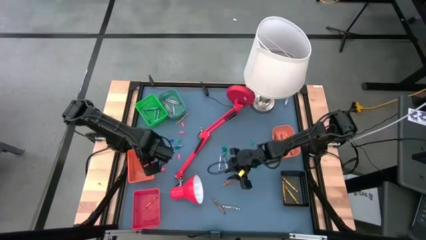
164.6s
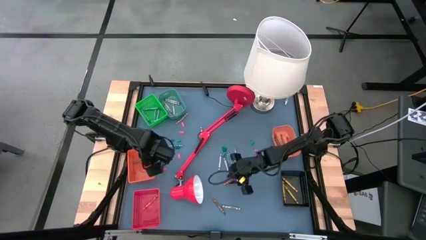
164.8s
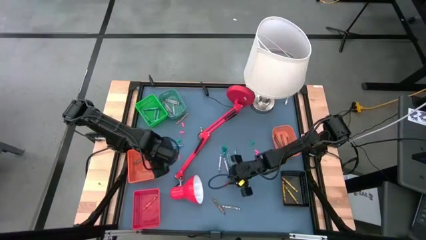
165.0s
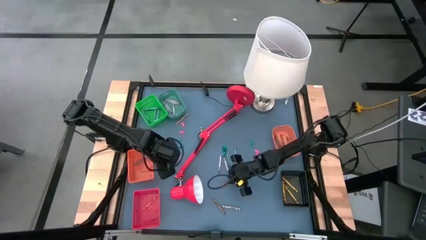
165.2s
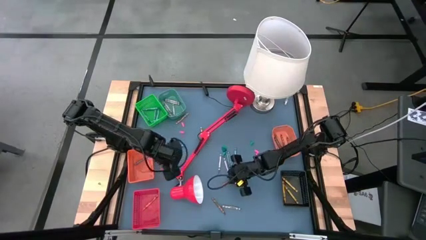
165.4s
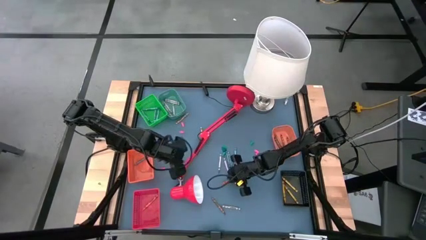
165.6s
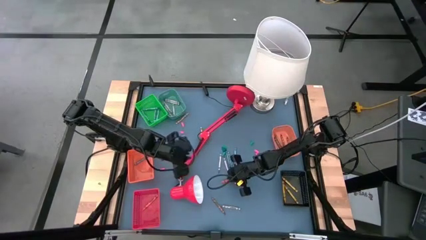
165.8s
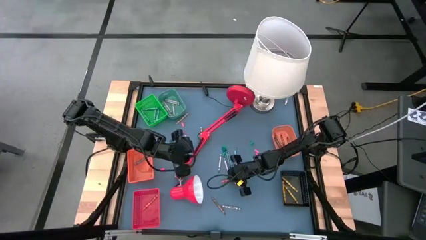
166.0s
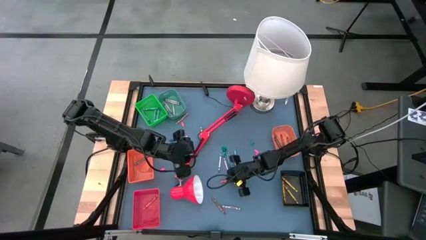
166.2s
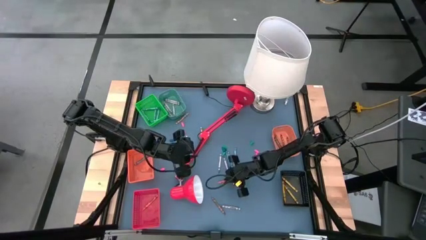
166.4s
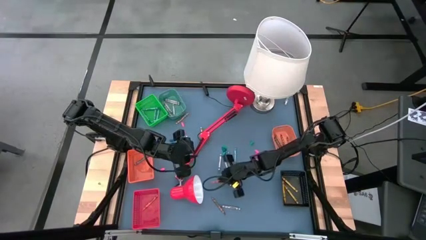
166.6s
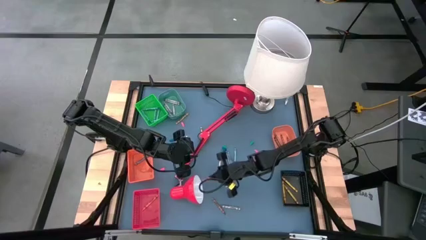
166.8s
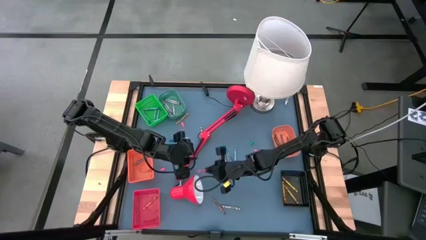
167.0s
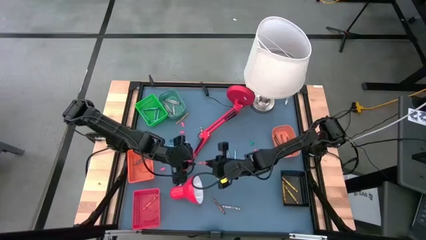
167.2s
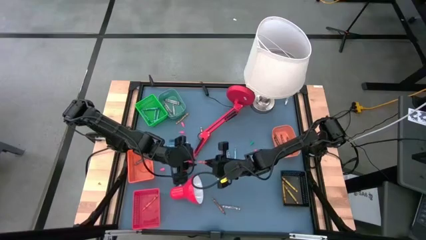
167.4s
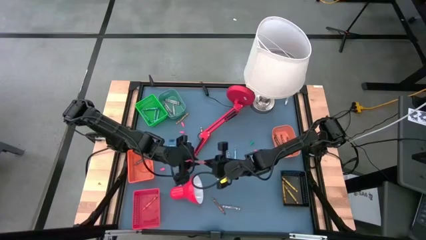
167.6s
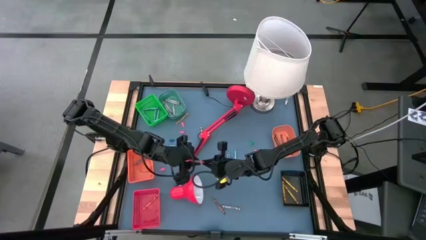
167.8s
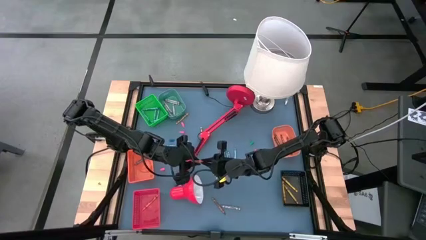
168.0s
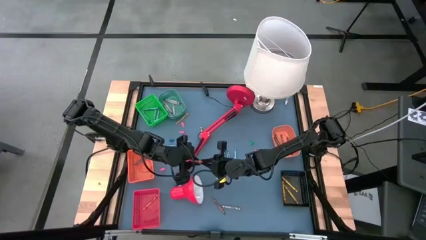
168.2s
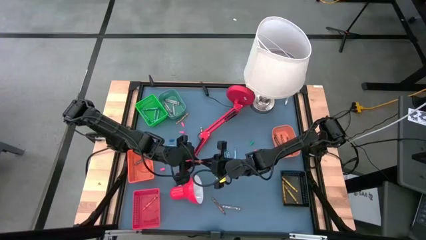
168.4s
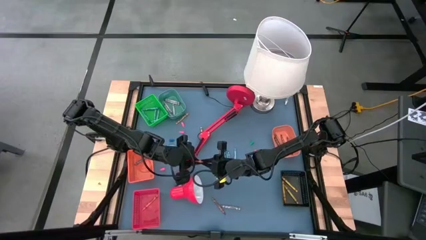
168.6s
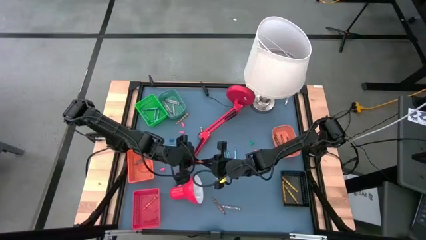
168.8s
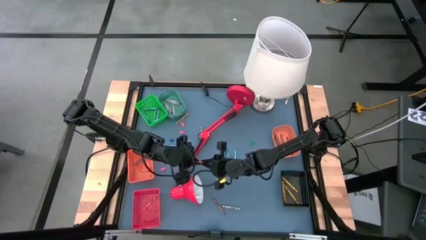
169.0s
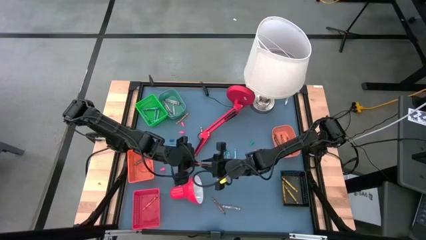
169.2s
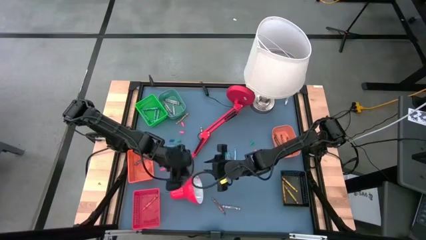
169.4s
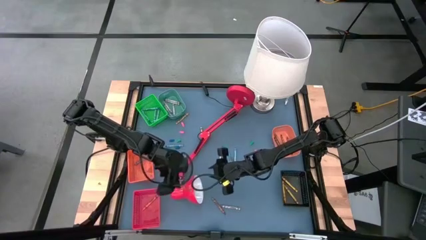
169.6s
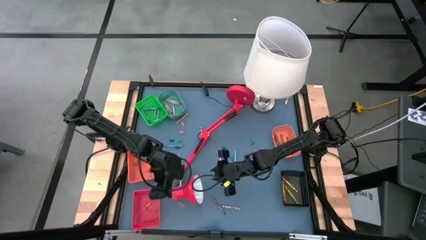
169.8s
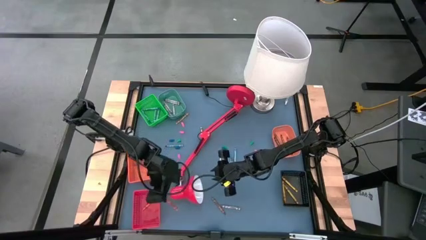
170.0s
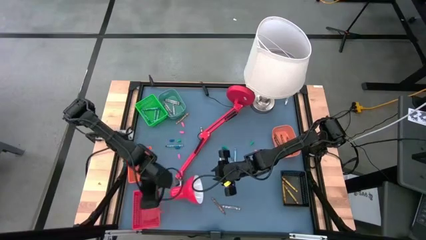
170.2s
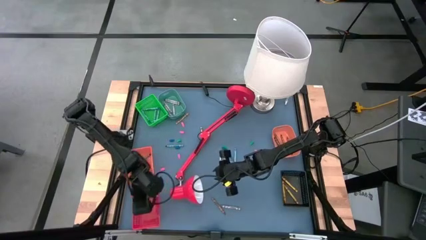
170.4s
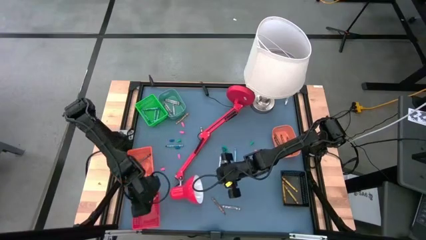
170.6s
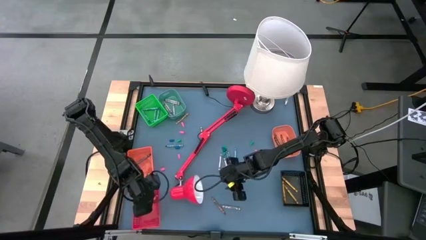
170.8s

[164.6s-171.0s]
Task: Sort crayons
Put the orange crayon into the red bin

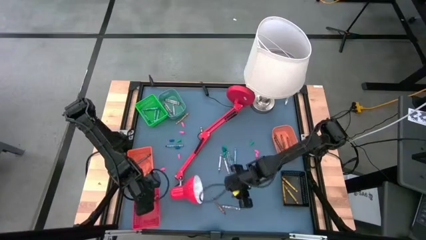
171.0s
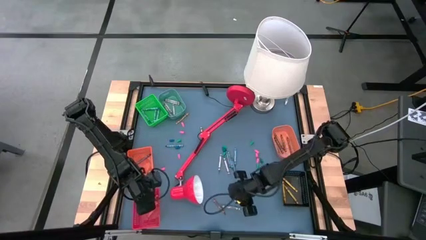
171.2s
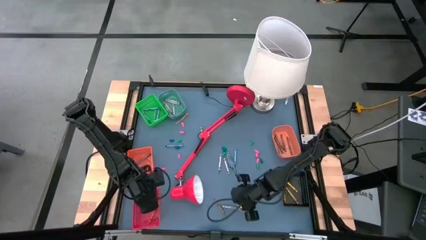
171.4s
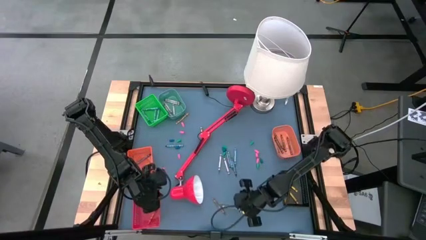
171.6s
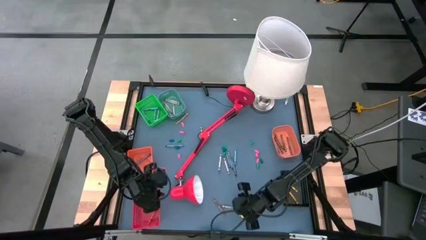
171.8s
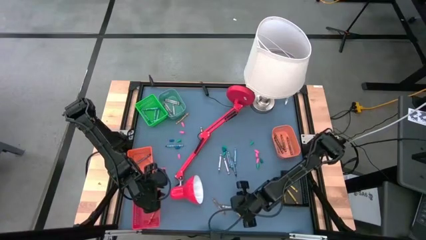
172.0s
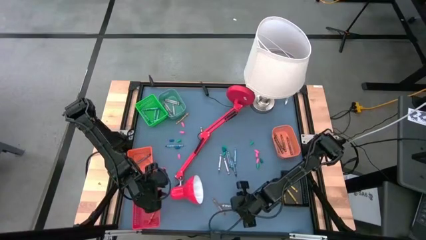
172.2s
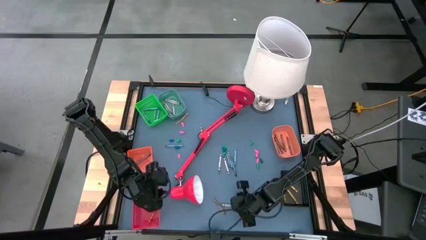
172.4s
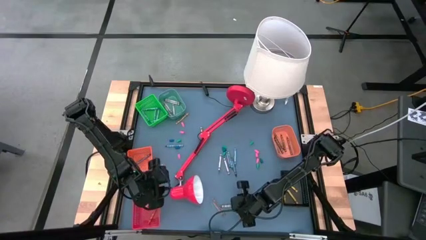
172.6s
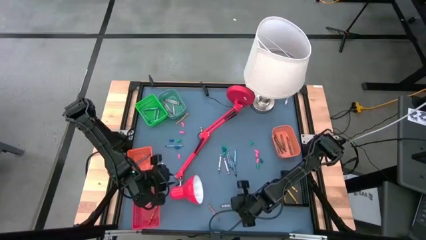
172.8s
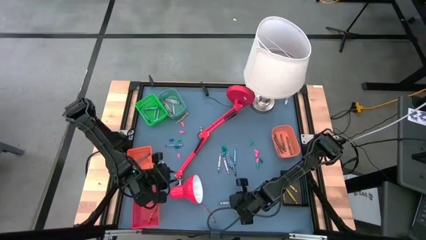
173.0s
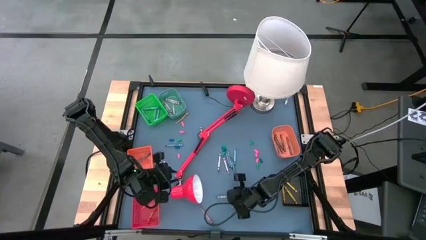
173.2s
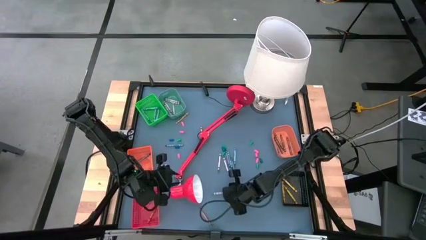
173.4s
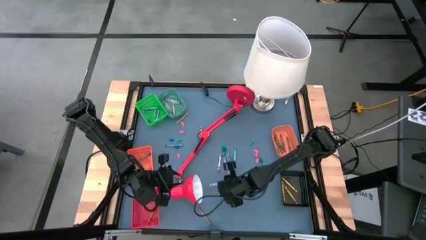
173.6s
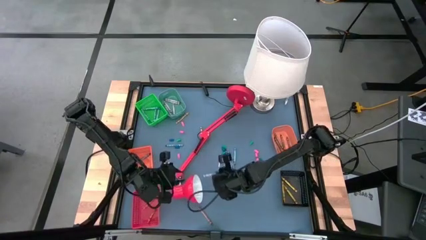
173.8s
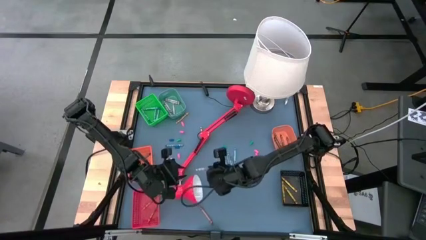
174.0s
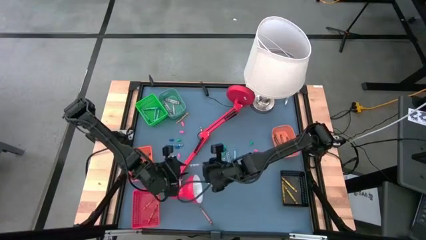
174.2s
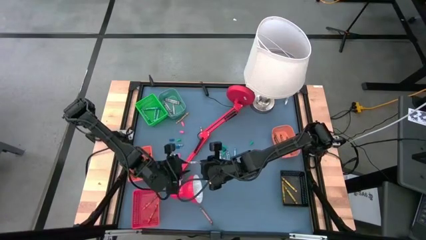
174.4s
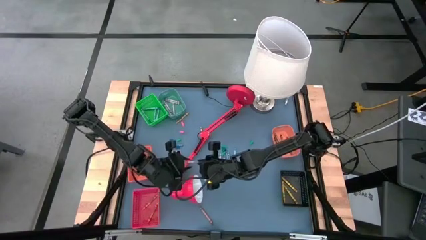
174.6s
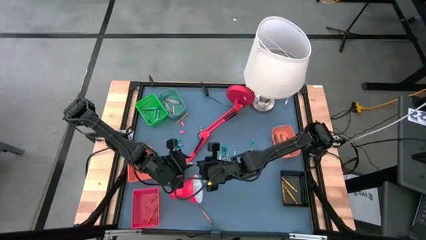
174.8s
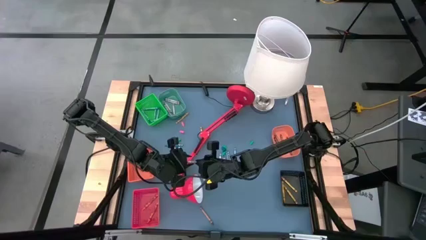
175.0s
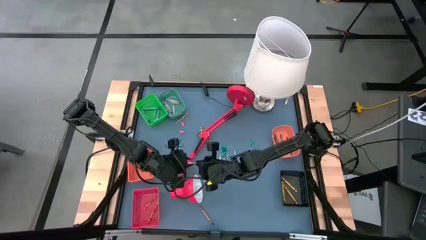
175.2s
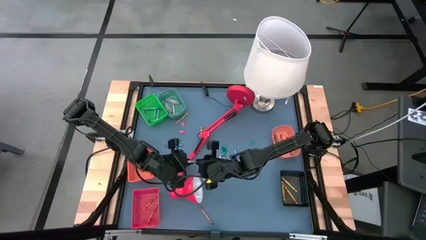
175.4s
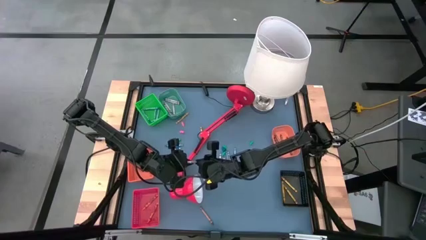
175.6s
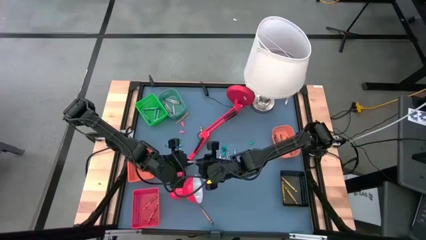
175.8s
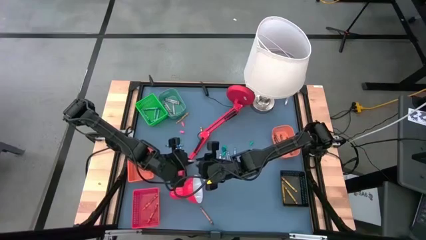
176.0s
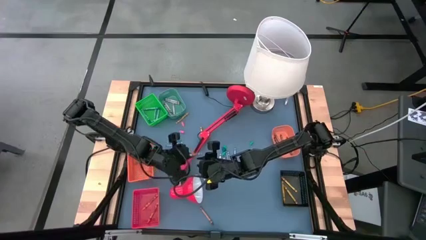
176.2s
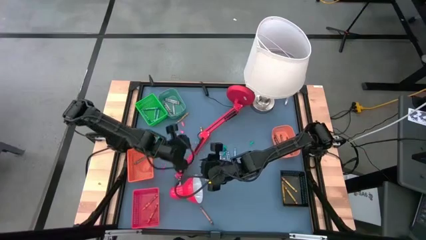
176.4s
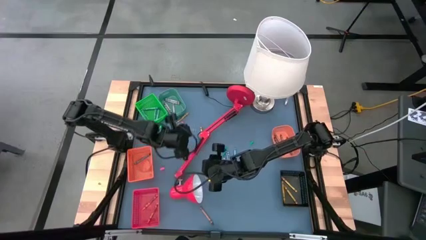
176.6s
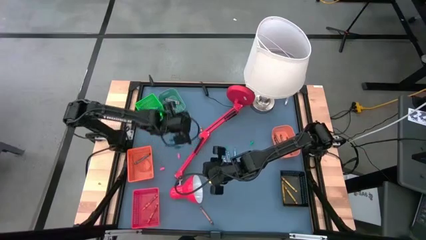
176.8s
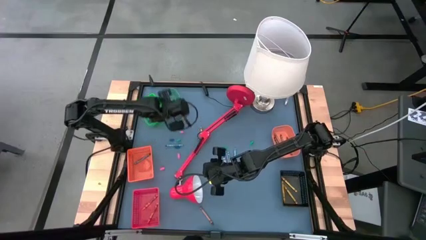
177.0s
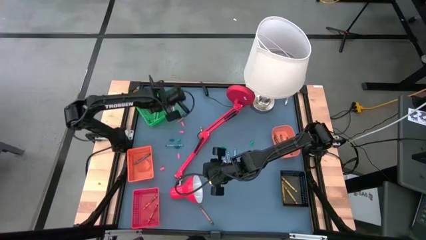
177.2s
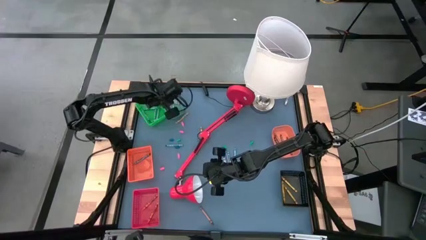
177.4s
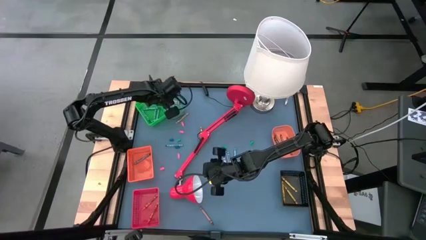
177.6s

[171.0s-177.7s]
Put the bottom gray crayon into the blue bin

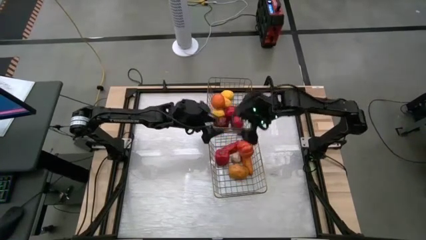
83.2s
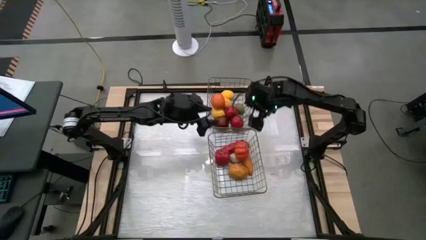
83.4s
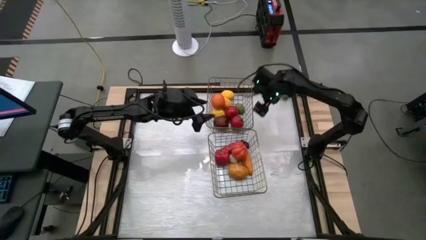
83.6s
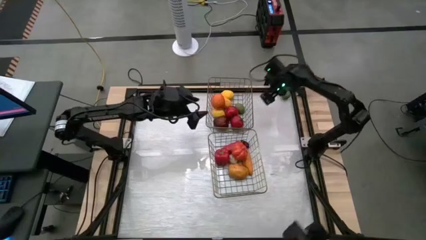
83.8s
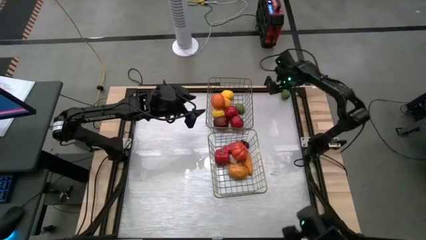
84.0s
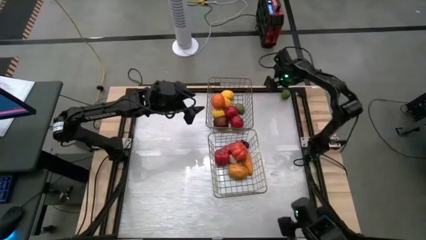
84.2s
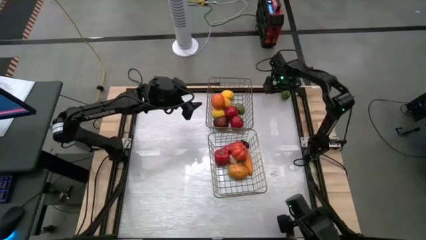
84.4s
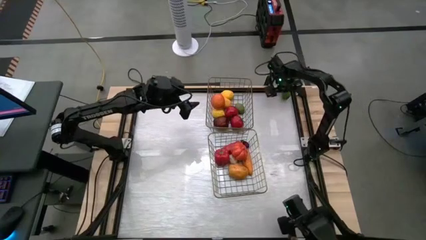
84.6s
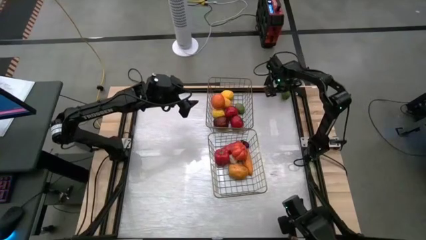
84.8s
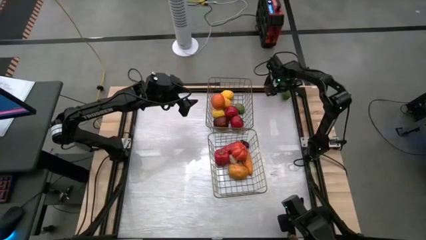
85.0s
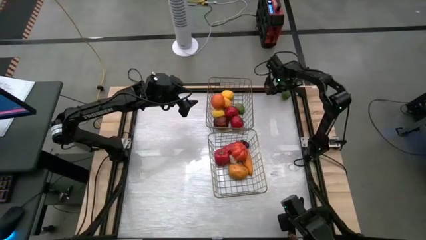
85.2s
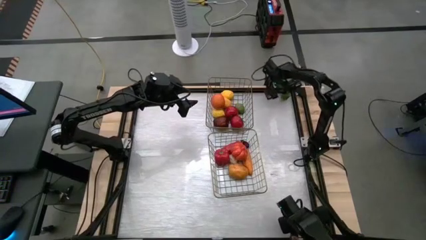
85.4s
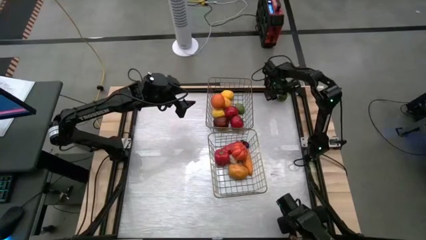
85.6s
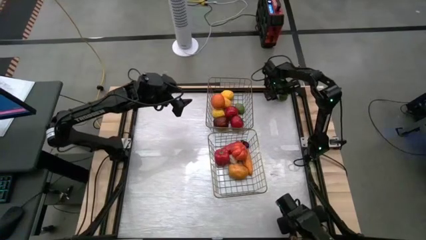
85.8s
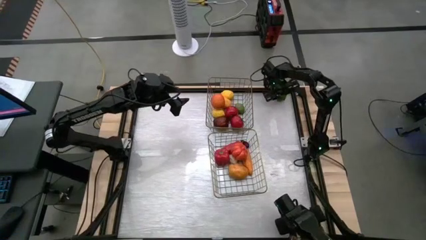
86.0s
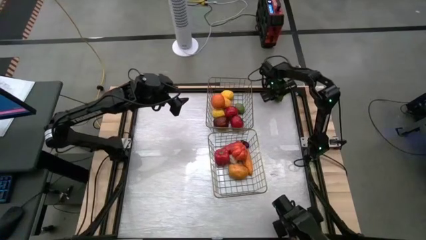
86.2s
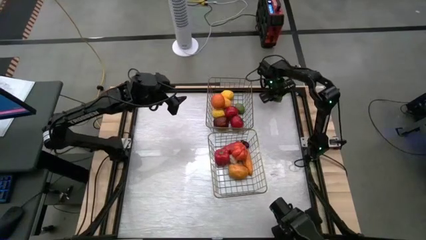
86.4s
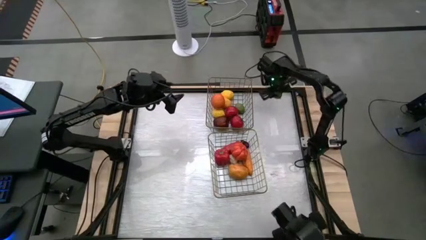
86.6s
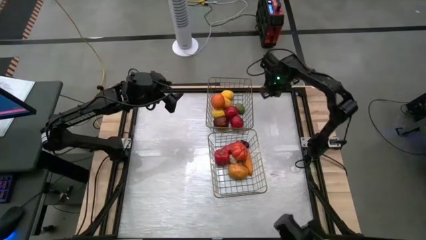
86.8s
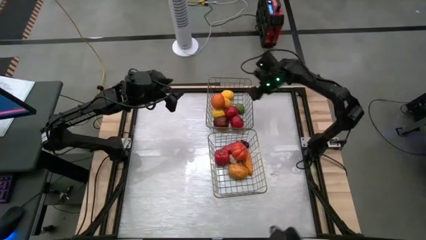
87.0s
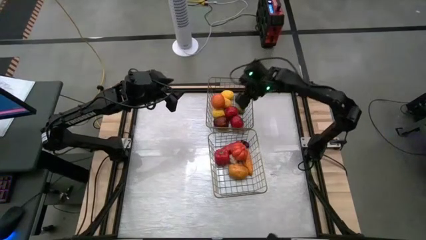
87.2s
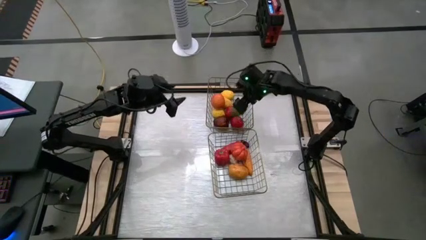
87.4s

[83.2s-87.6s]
Task: Sort produce into baskets
Put the green lime into the top wire basket
